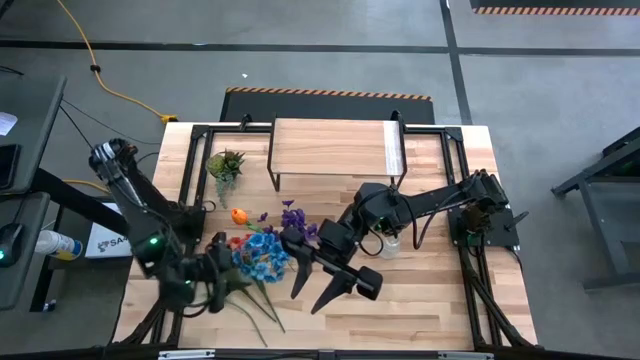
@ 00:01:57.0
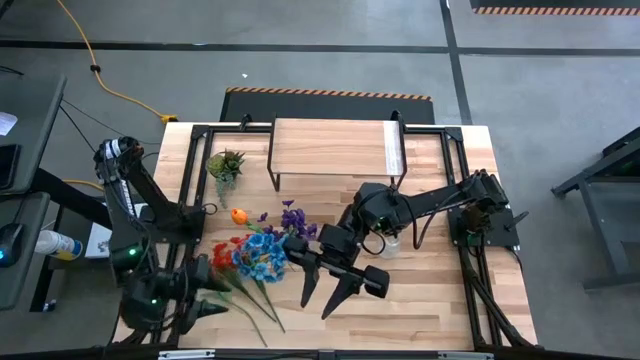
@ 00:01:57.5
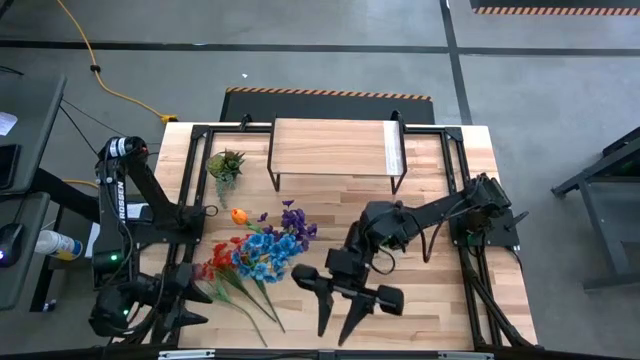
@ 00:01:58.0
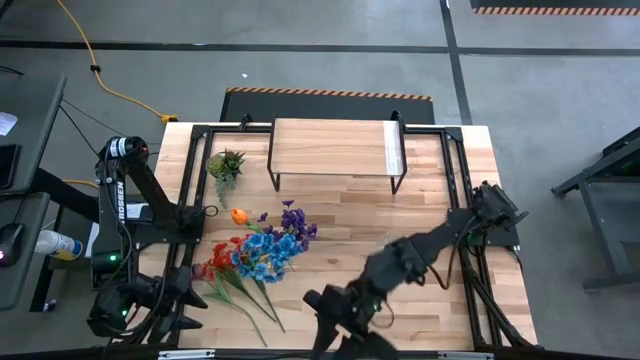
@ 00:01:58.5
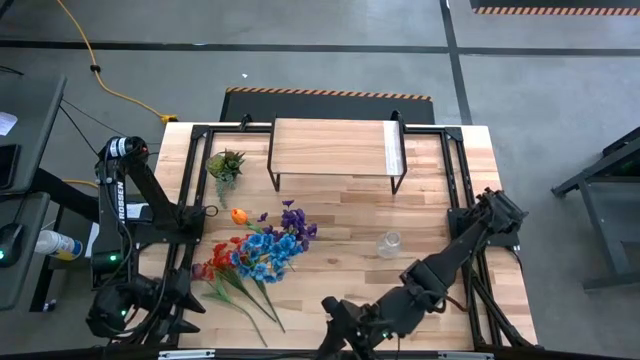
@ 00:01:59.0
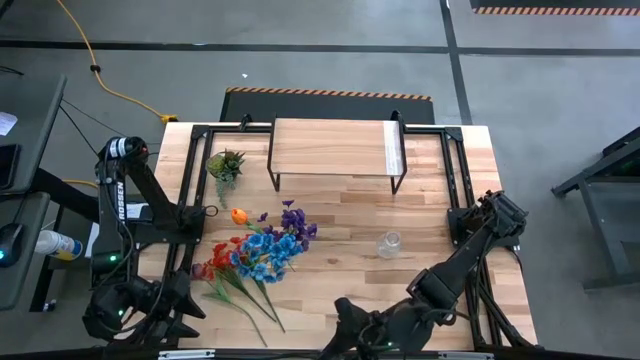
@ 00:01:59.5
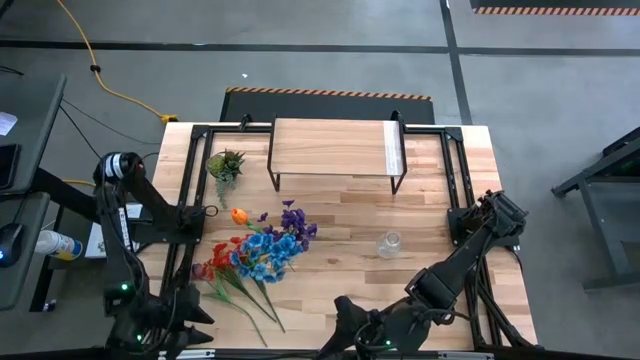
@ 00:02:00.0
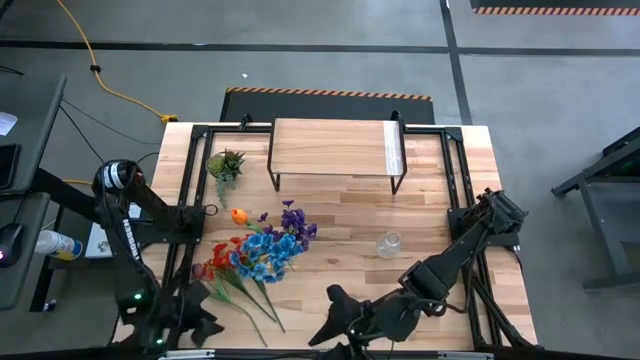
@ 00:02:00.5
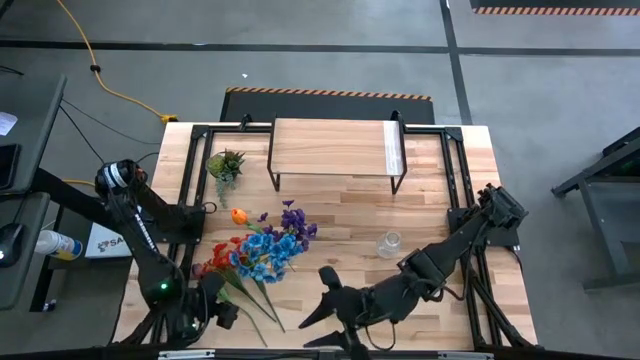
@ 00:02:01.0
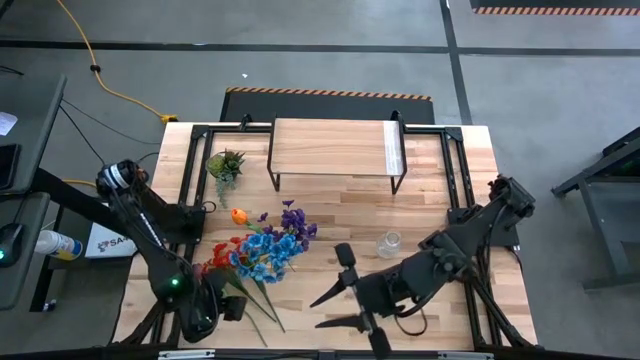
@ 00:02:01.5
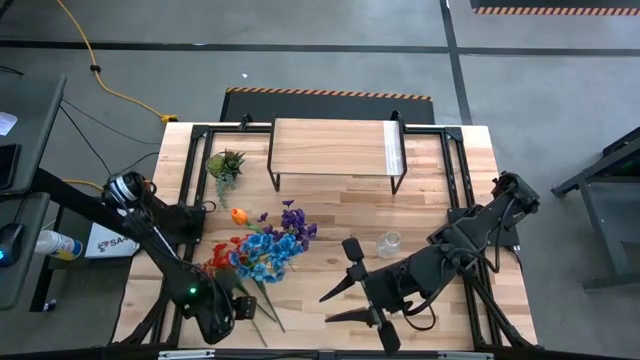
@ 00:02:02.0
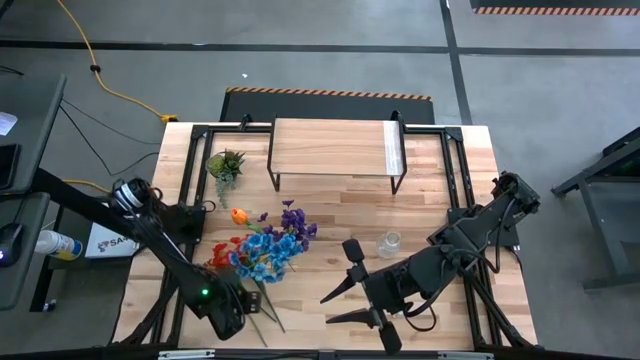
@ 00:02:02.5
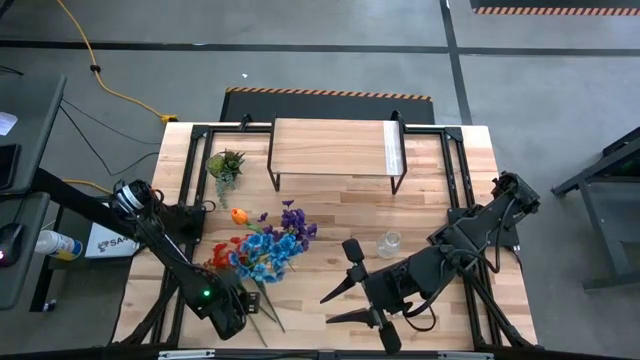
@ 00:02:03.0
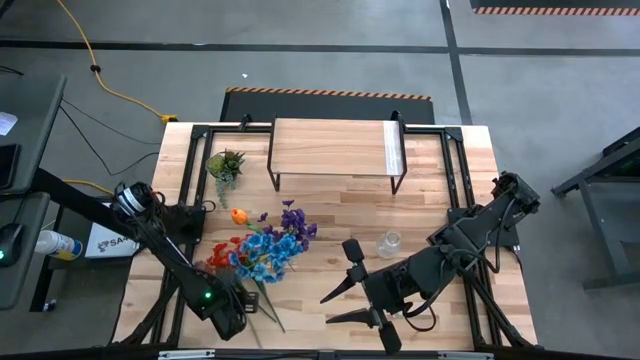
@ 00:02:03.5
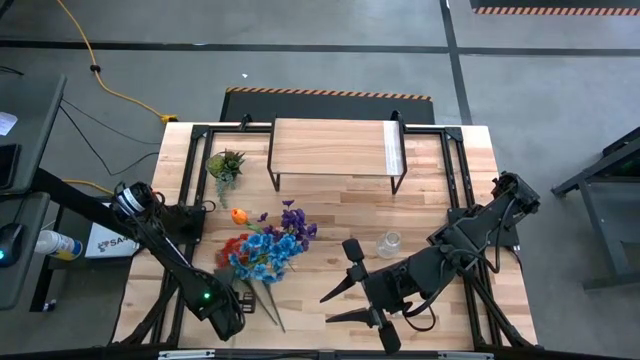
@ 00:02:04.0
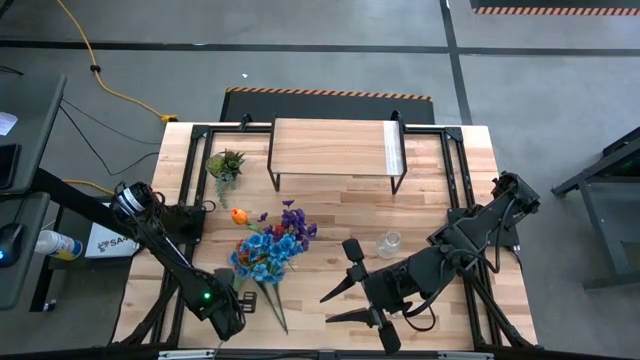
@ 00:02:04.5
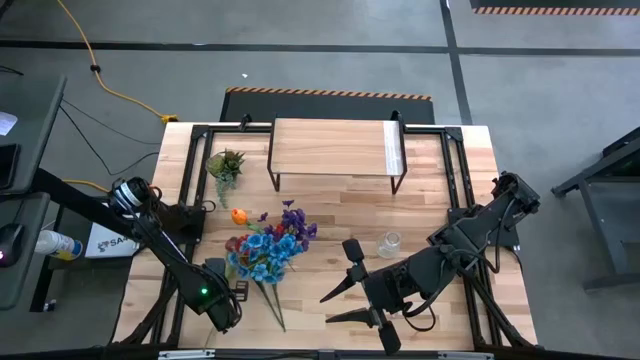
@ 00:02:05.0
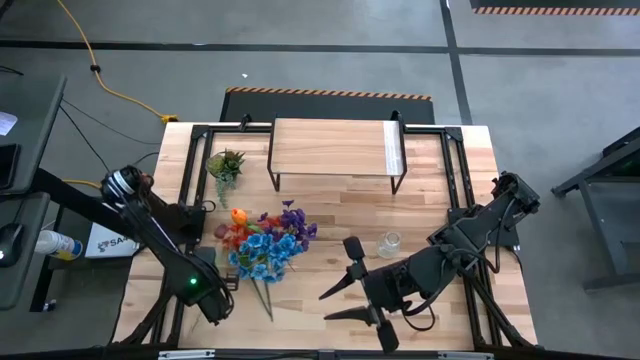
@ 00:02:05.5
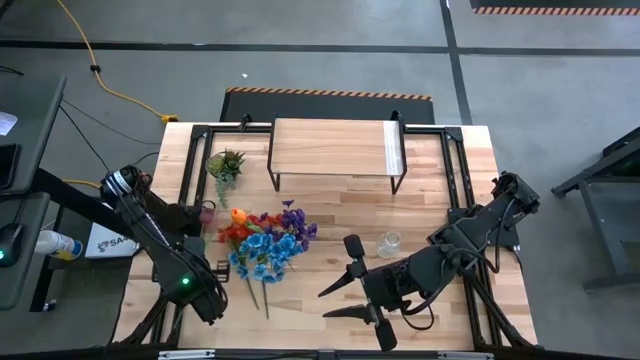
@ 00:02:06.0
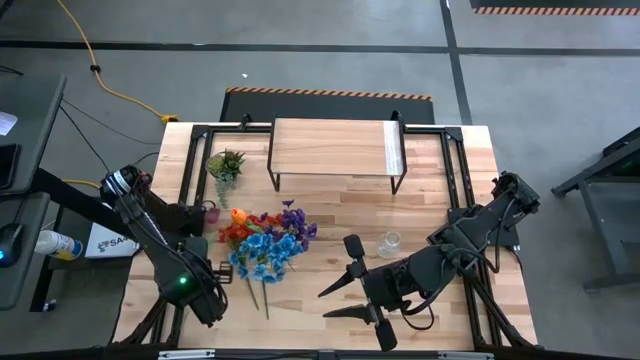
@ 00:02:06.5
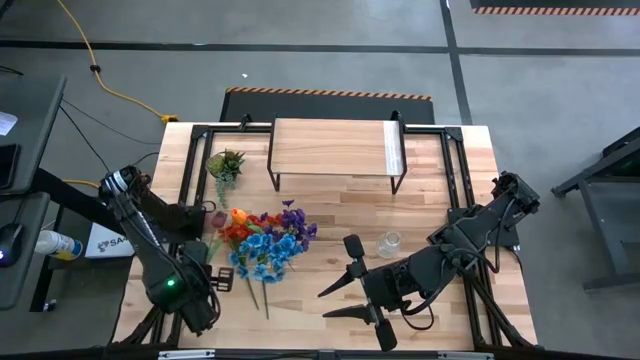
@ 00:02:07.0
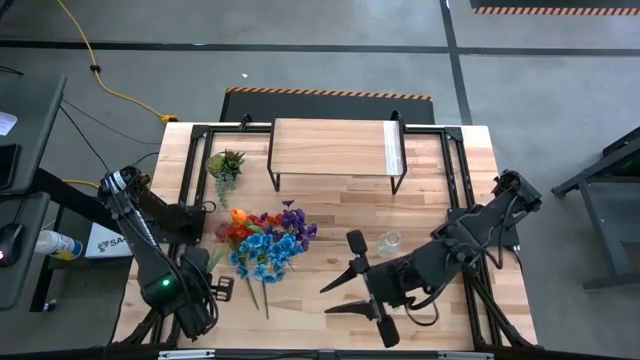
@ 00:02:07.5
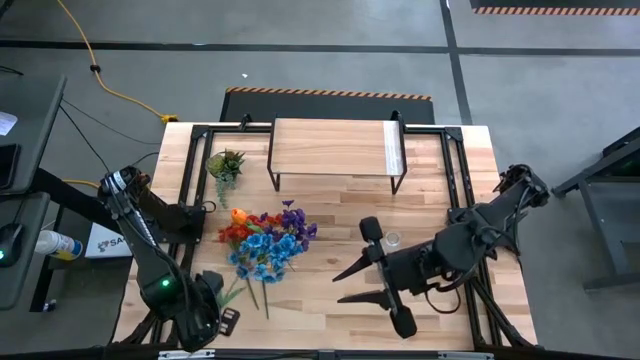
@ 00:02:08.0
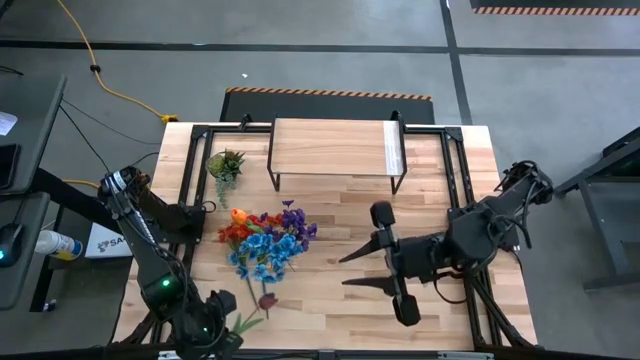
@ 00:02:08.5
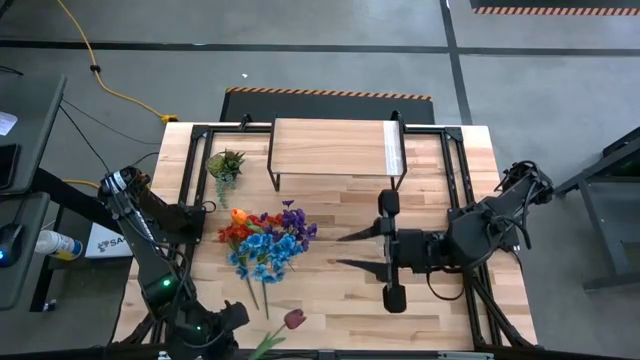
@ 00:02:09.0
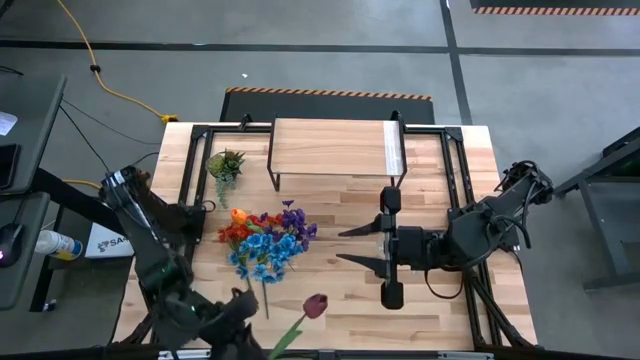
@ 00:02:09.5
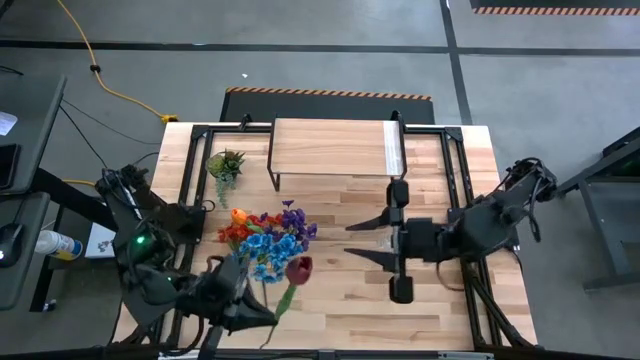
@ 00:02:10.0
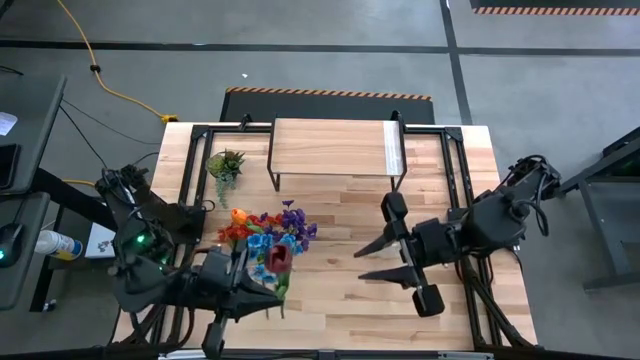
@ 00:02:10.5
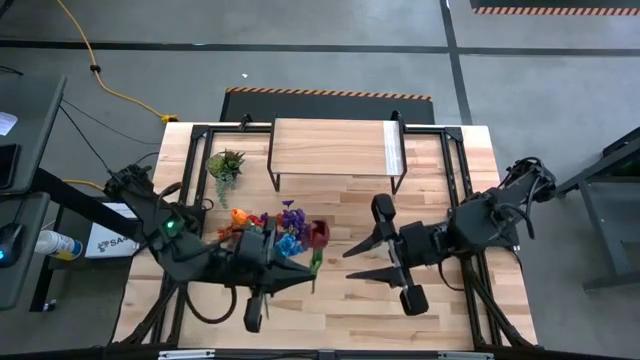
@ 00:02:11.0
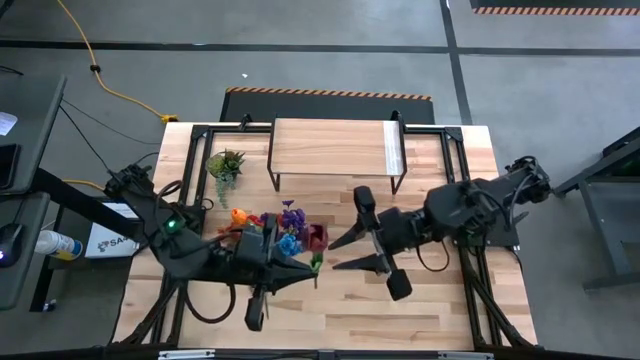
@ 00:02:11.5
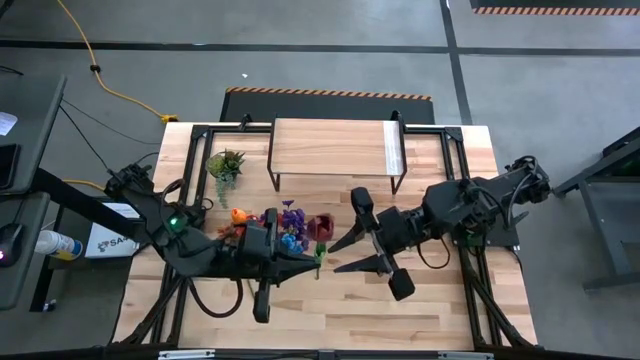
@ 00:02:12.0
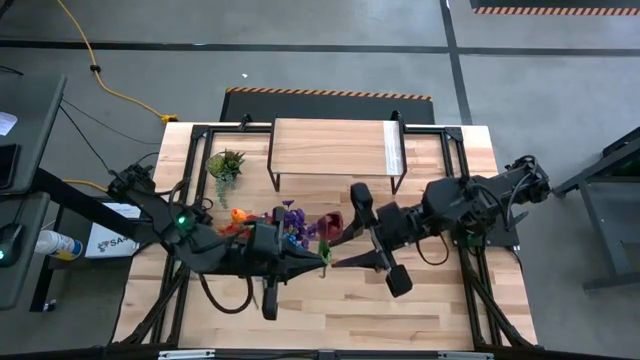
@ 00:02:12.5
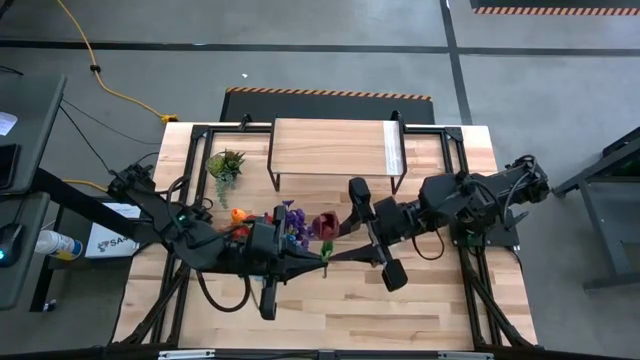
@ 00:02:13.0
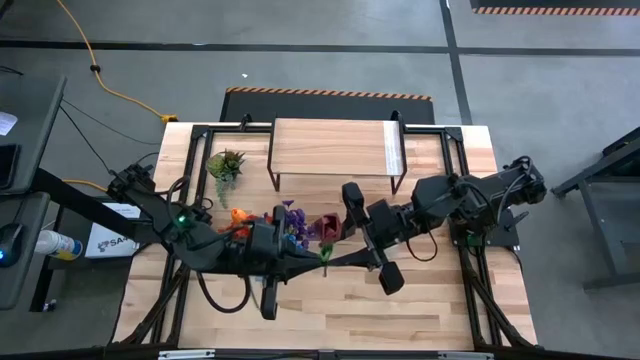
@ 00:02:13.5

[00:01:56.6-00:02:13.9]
Task: Pick and place flowers into a vace then onto a shelf
Put the red flower into the right transparent flower vase

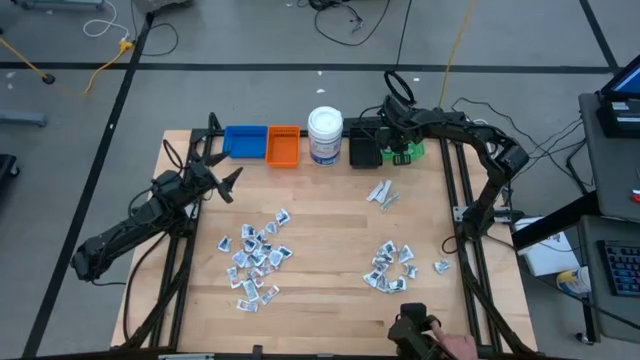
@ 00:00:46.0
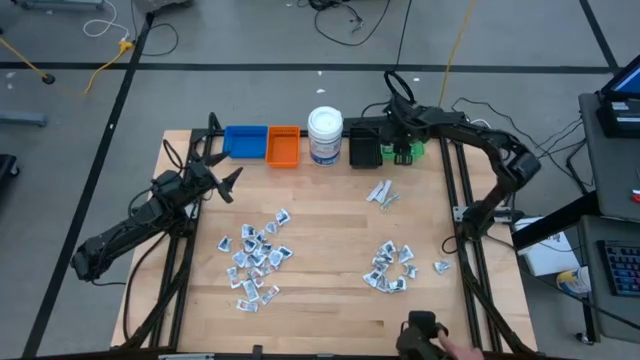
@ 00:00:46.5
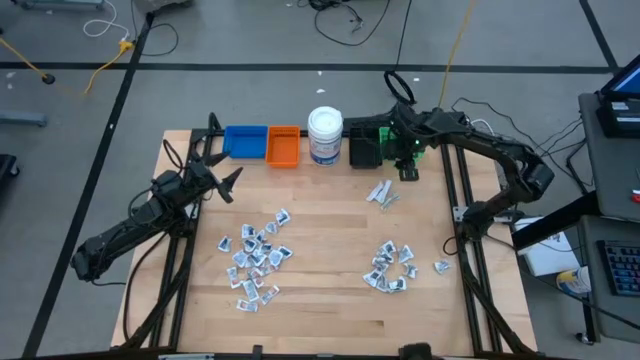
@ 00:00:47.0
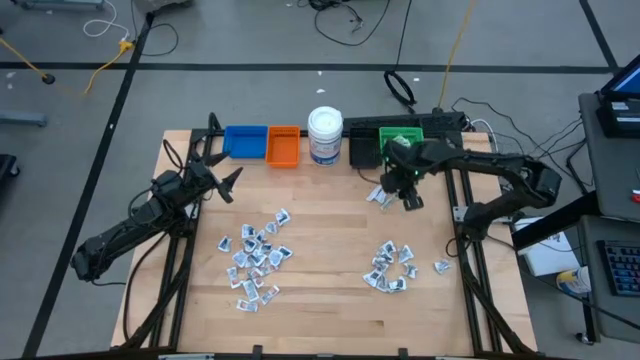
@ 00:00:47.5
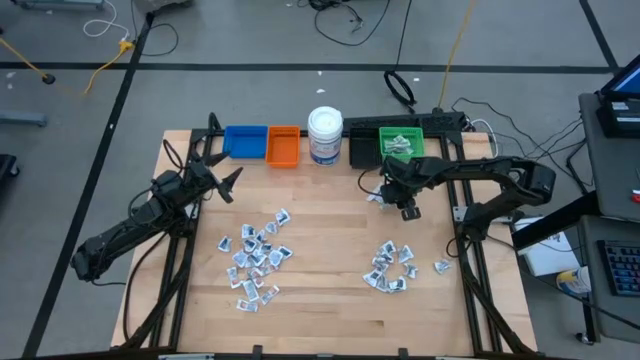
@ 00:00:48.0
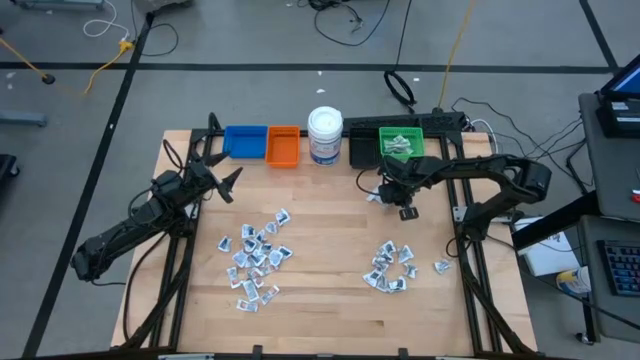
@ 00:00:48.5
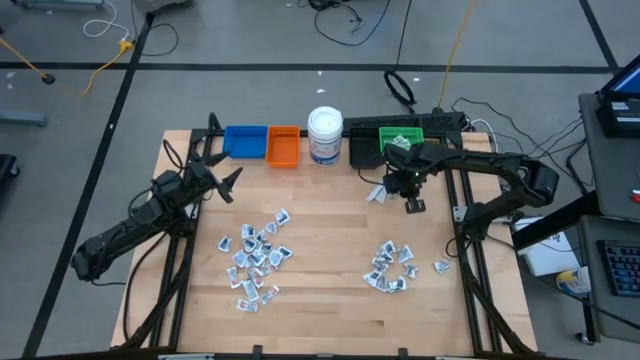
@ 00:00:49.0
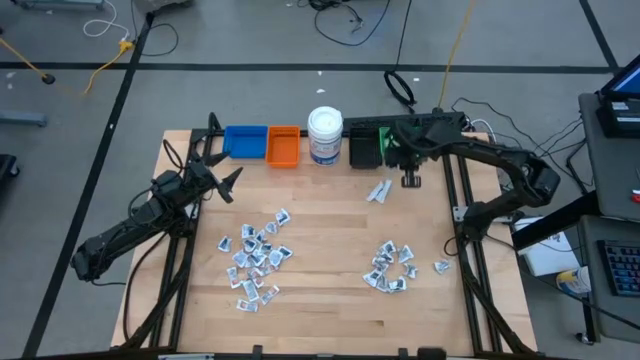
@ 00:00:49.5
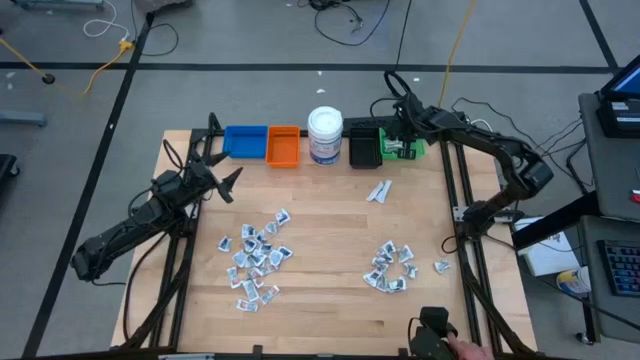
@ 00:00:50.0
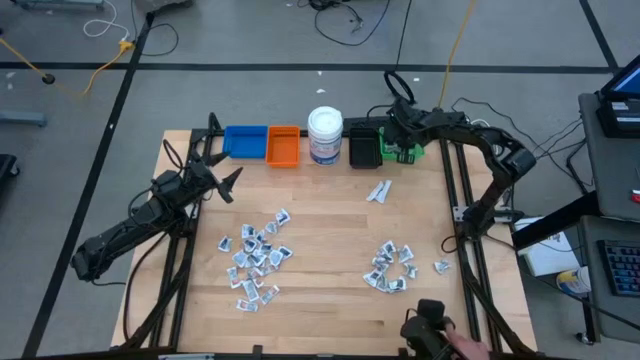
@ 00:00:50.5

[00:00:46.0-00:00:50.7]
Task: Pick & Place First Aid Supplies
Put the bandage into the green bin
